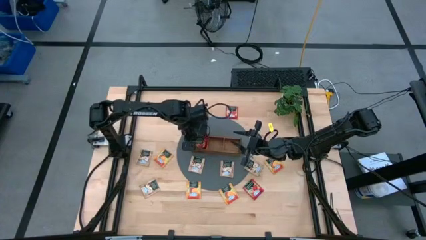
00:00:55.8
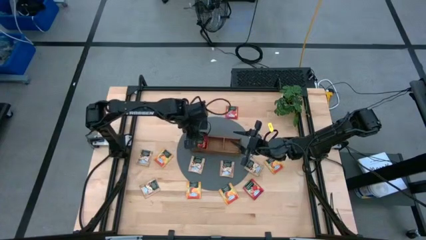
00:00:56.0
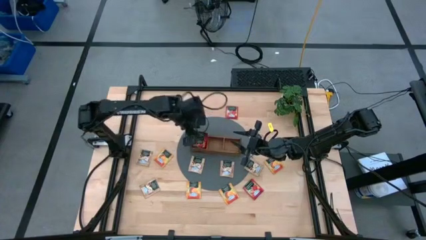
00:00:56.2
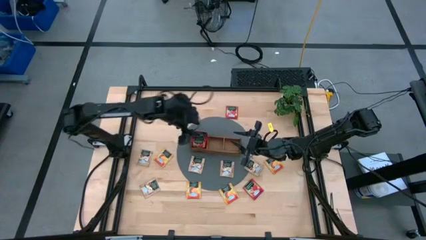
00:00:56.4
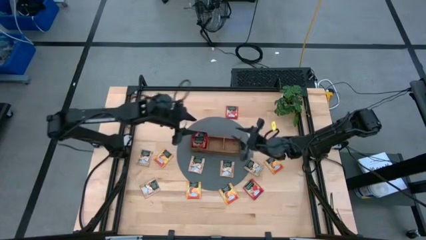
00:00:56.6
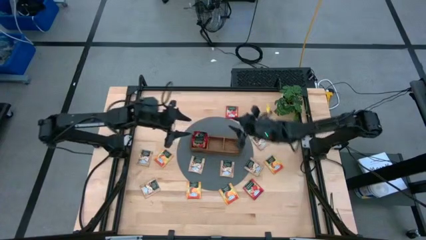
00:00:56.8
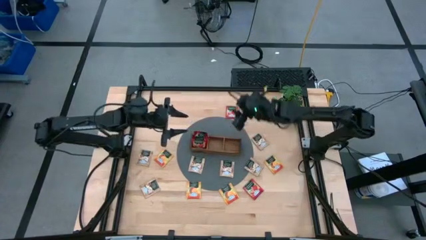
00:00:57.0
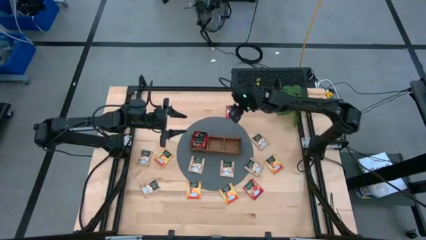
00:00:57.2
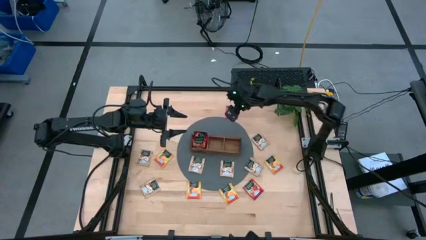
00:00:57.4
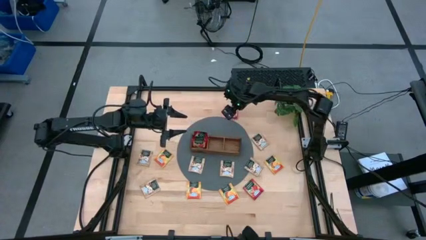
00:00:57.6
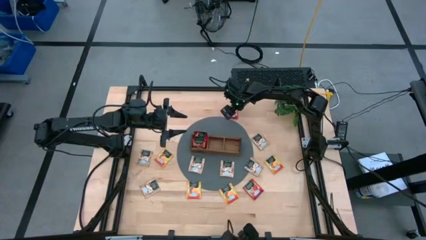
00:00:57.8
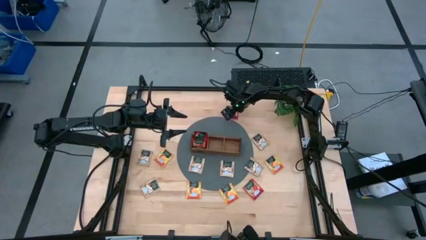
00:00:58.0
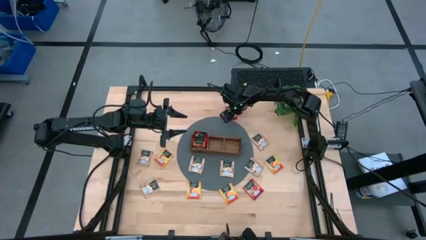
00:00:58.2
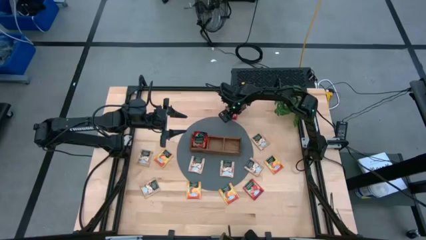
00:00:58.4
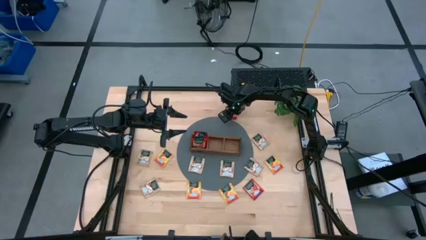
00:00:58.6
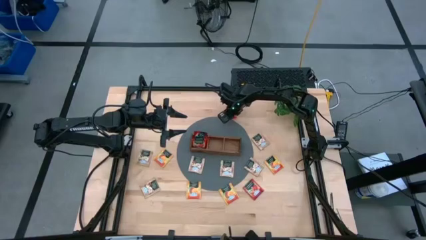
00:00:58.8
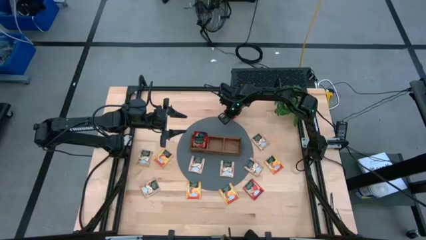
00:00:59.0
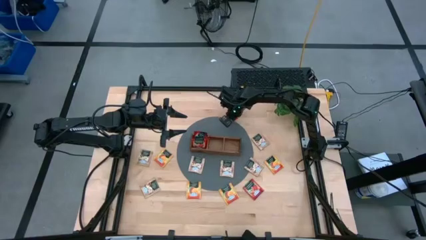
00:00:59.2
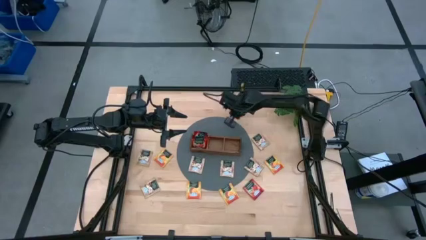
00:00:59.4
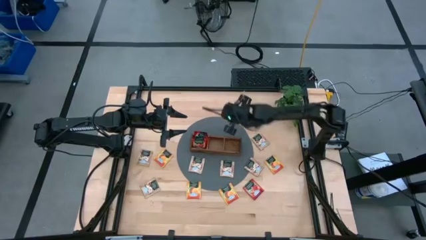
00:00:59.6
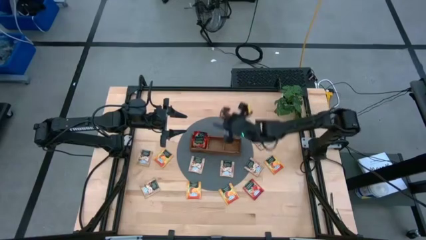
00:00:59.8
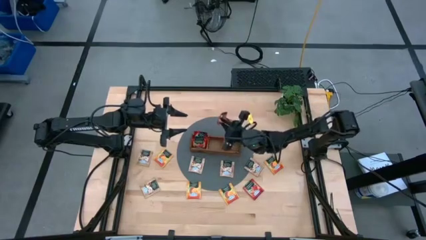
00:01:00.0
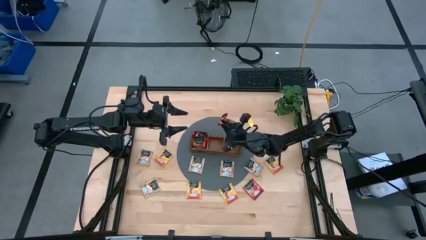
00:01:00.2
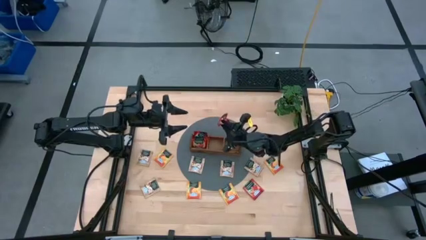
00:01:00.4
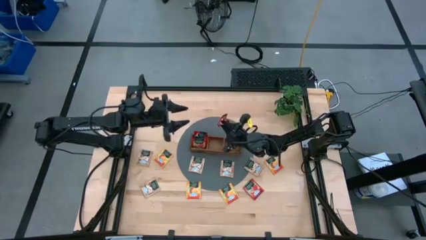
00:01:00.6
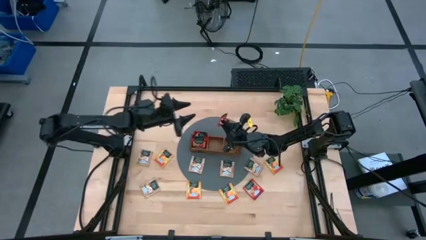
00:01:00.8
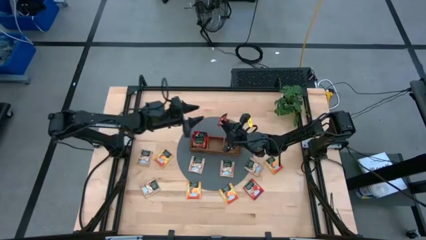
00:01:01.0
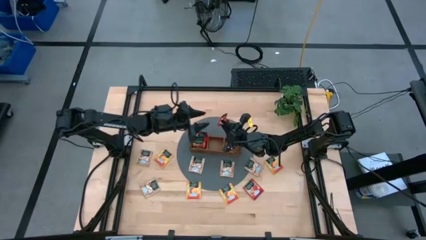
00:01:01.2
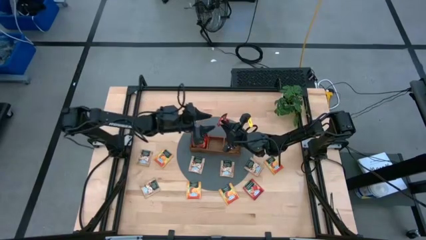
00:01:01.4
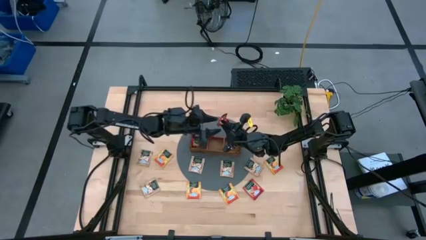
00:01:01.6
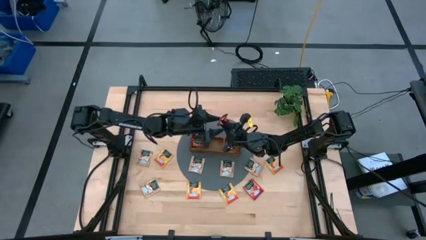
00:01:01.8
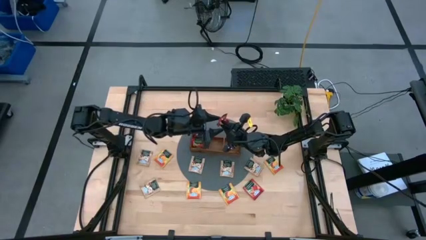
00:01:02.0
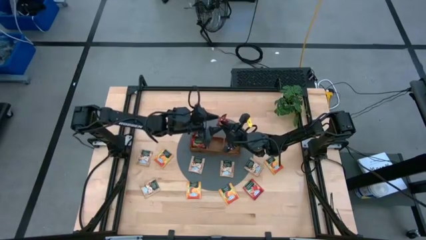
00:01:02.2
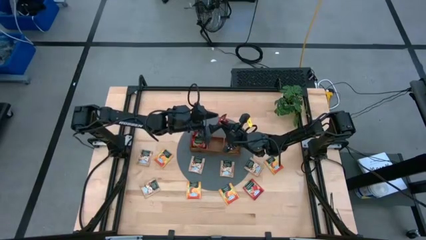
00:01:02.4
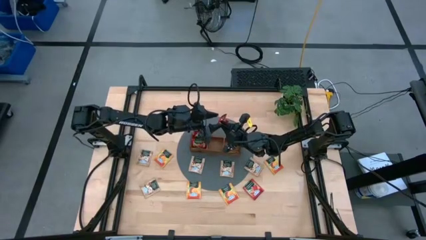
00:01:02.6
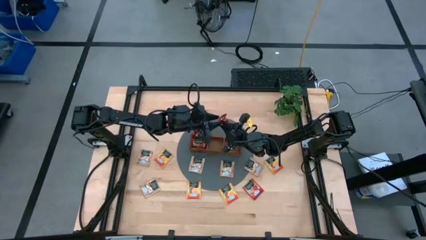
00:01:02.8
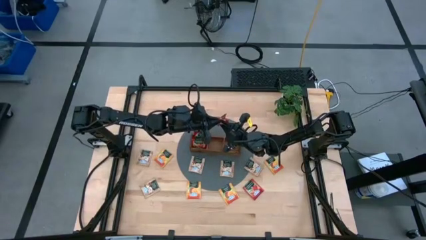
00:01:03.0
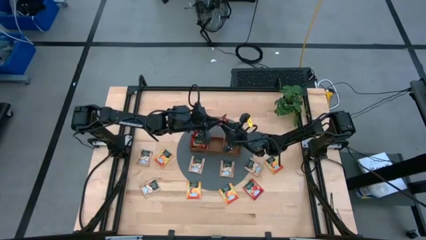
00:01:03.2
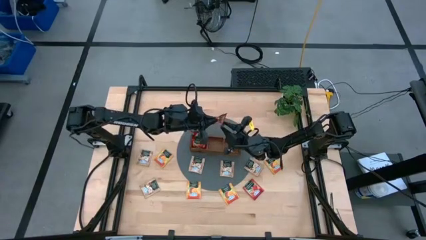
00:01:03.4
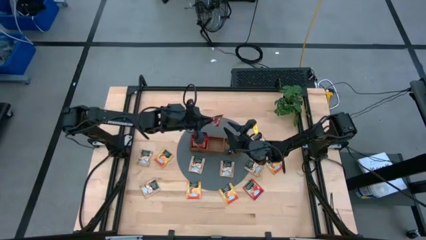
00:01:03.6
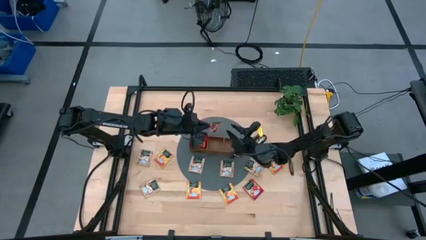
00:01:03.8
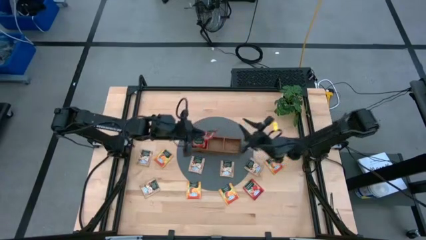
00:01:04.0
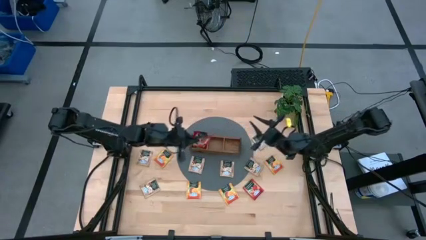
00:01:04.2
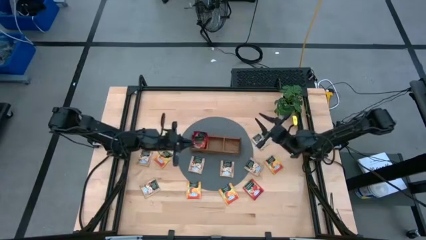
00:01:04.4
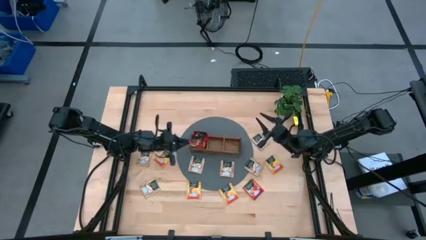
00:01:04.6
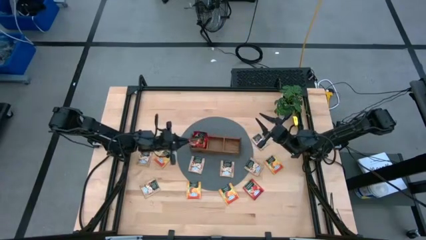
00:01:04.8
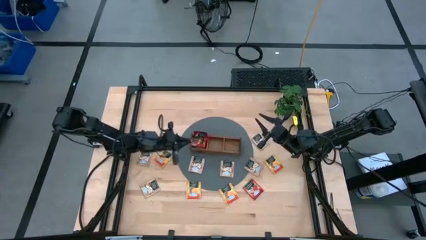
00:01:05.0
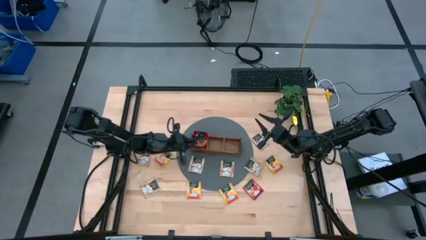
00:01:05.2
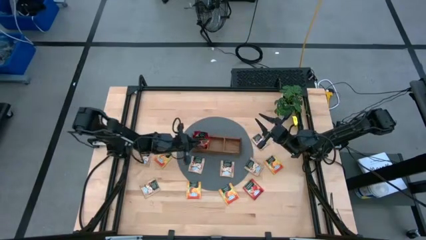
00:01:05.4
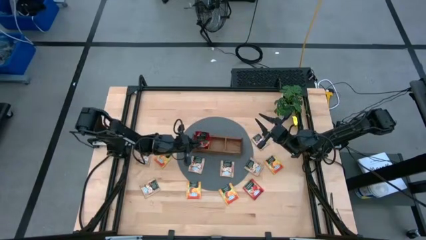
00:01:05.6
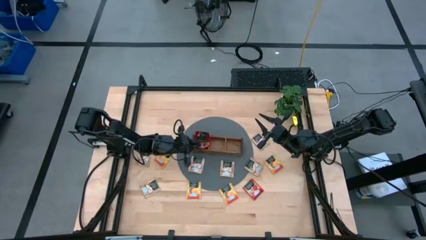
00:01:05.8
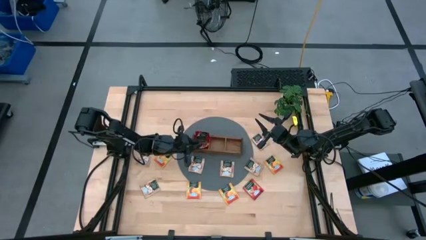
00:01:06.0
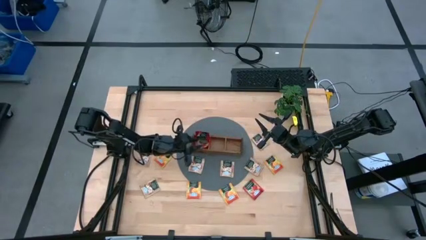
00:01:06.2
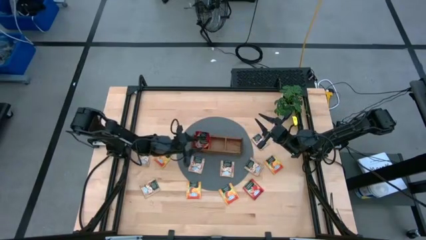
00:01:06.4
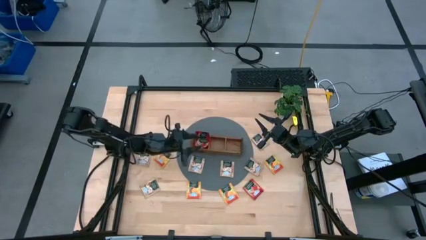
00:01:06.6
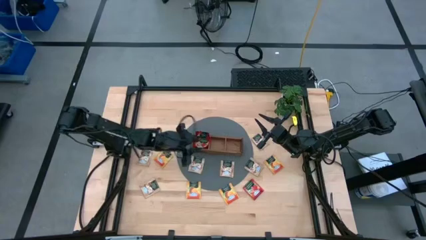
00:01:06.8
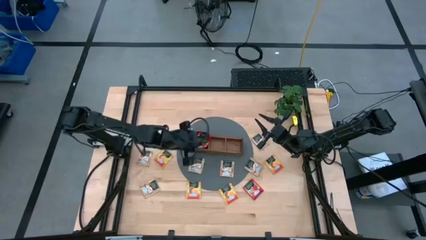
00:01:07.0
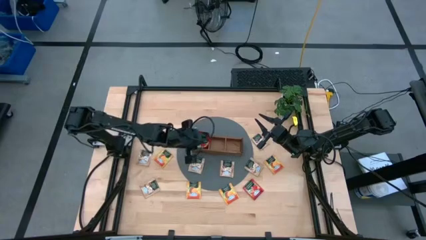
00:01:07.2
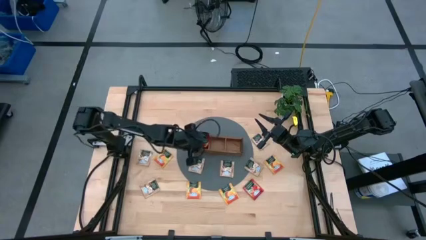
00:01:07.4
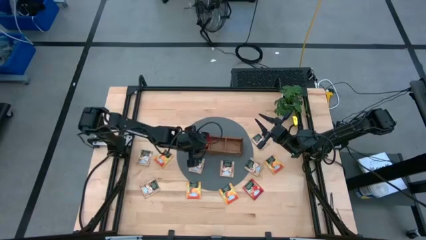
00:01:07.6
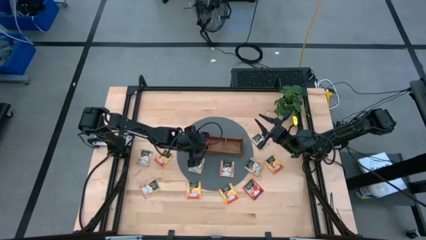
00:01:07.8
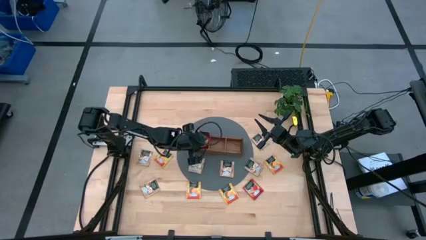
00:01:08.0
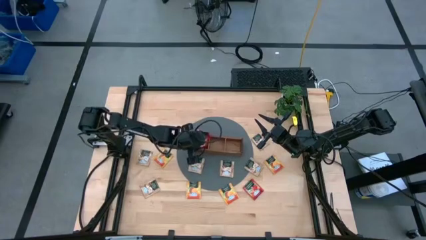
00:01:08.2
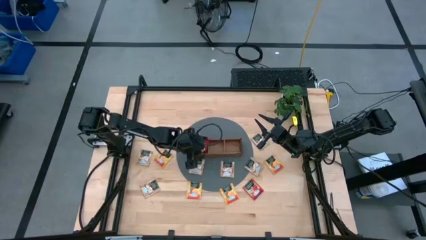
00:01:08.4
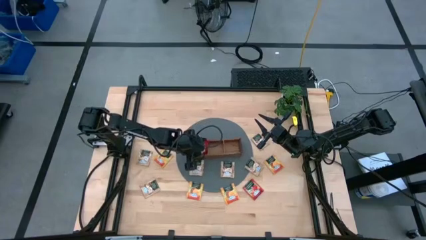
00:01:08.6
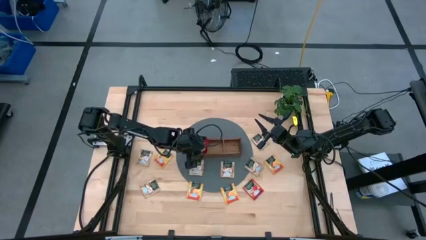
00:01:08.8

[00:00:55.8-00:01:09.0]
Task: Pick & Place Tea
Put the red tea bag into the left section of the wooden organizer

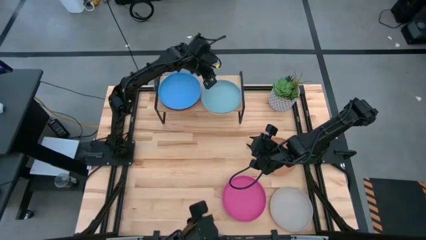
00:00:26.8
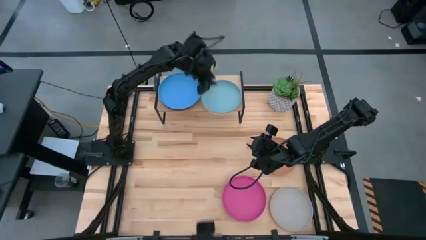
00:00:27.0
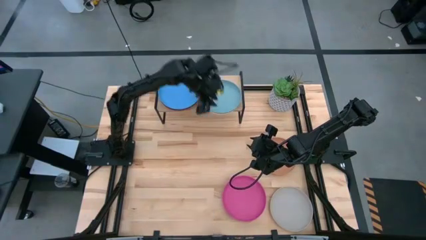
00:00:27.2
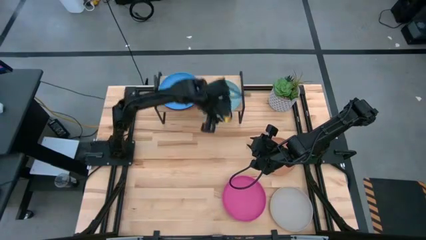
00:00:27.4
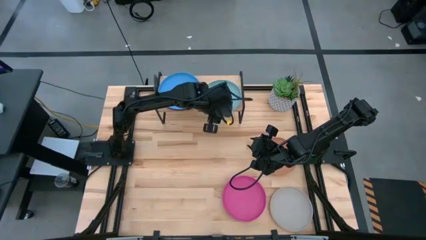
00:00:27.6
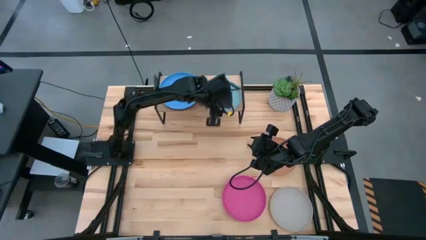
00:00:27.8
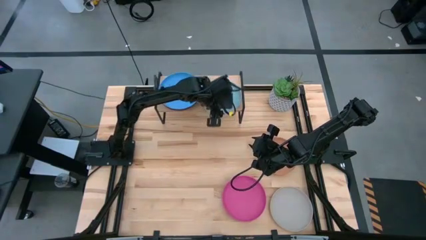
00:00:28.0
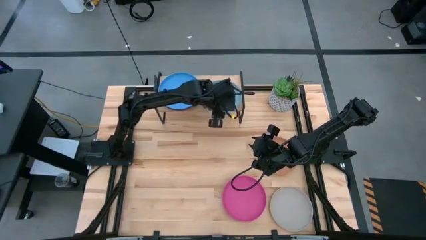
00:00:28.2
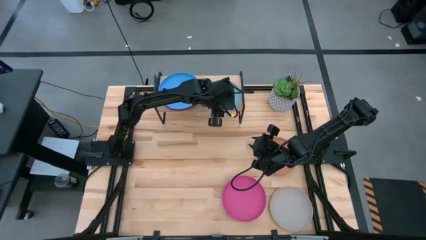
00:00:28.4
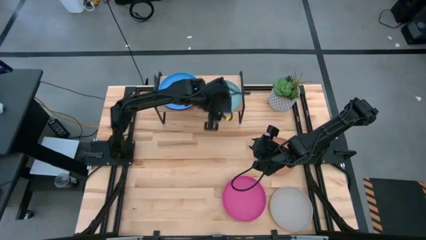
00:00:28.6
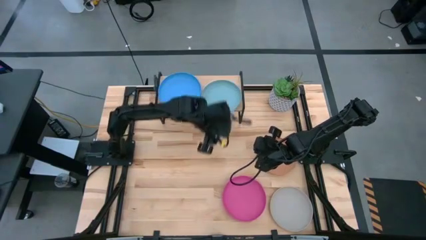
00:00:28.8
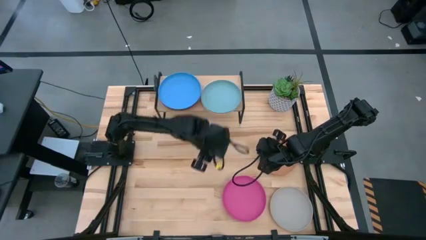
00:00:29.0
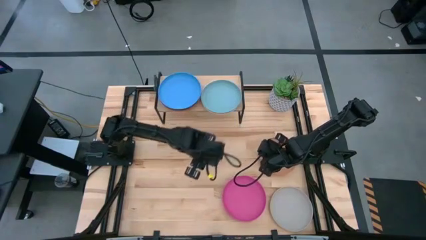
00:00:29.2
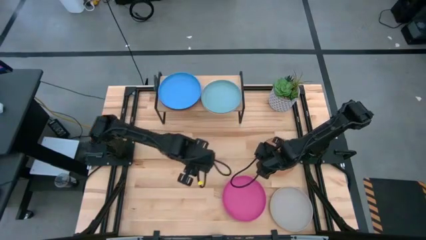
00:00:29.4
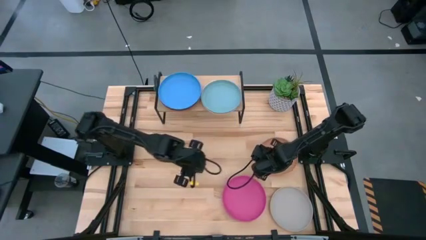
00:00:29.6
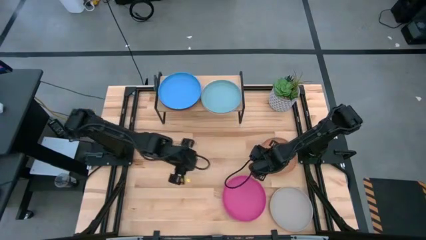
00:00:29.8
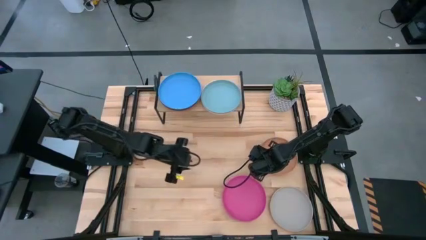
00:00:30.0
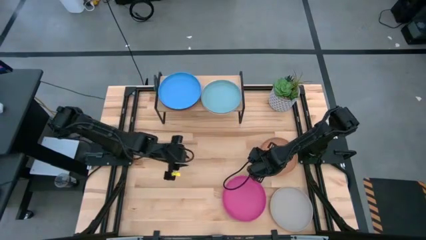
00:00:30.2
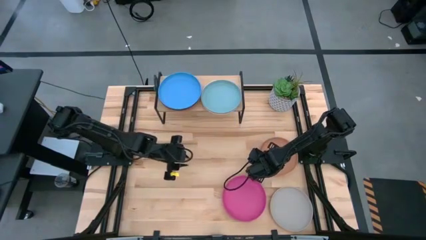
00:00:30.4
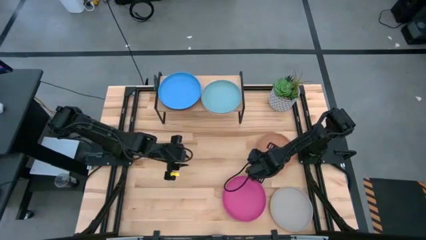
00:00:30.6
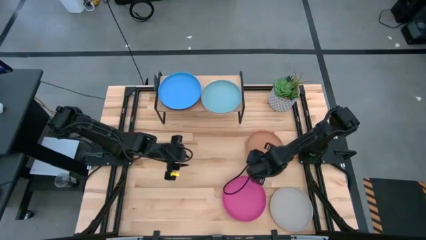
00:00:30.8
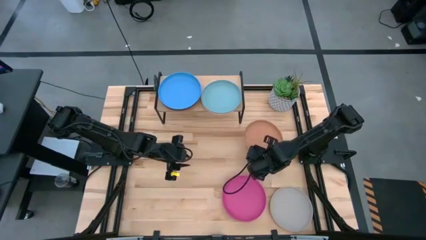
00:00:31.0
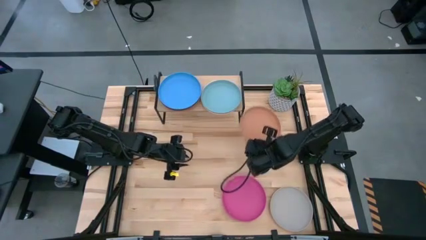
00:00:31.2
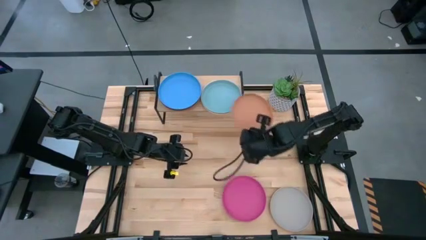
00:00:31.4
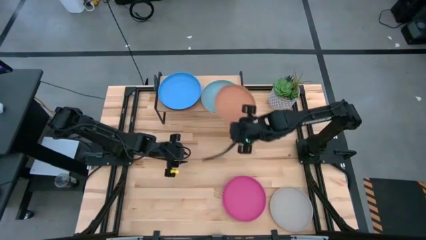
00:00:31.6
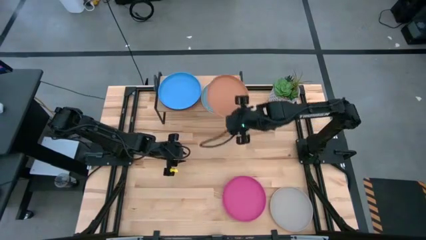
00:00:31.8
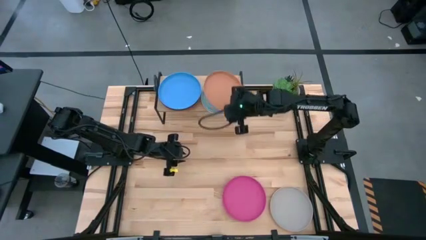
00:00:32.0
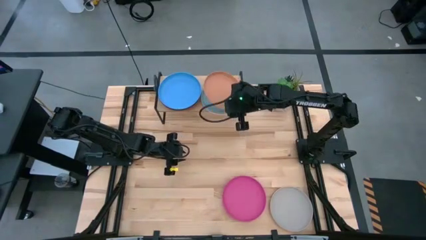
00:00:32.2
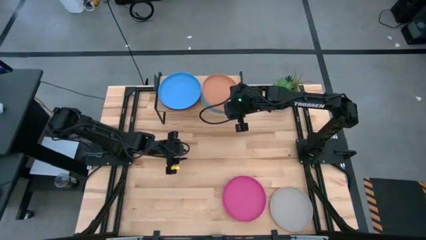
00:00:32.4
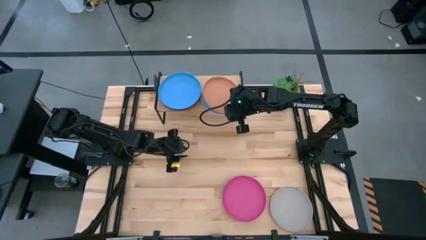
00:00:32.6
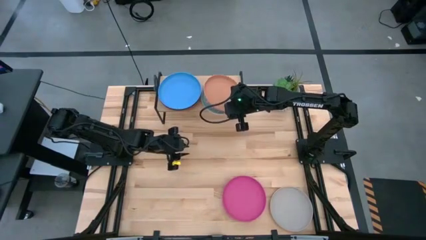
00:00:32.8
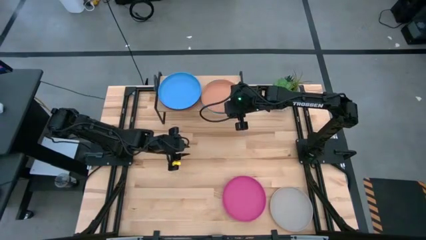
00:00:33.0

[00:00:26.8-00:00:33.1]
Task: Place and stack plates onto a shelf
Stack the brown plate on top of the light blue plate on the shelf
